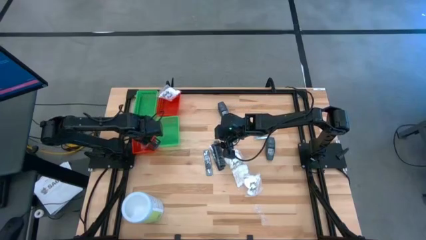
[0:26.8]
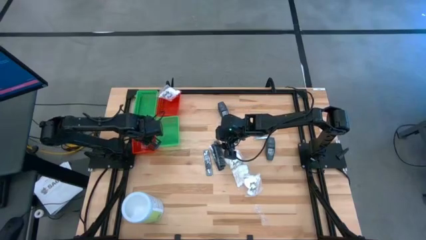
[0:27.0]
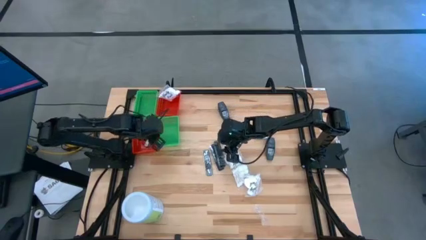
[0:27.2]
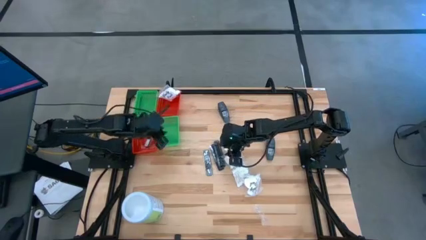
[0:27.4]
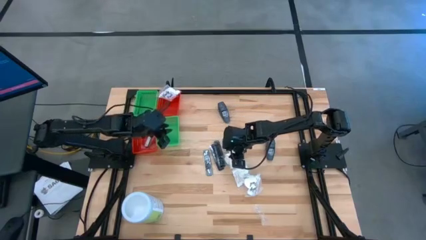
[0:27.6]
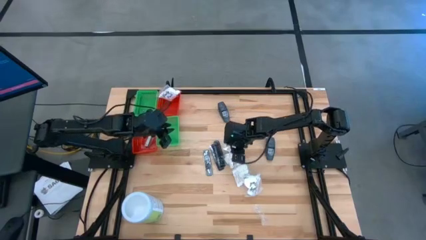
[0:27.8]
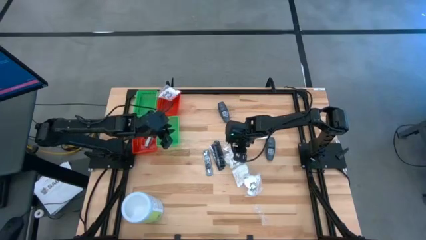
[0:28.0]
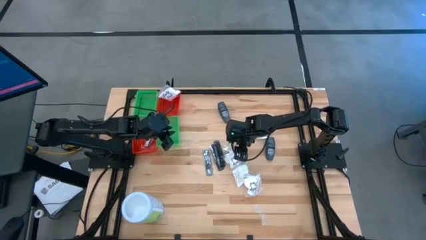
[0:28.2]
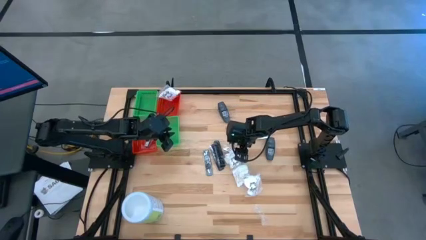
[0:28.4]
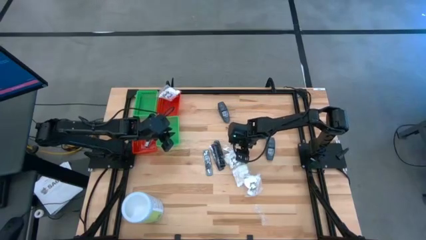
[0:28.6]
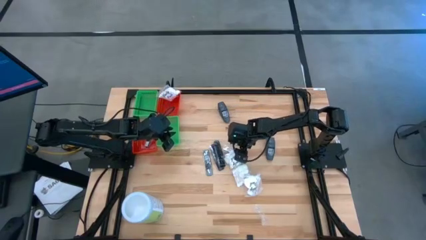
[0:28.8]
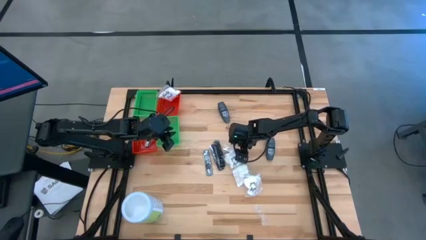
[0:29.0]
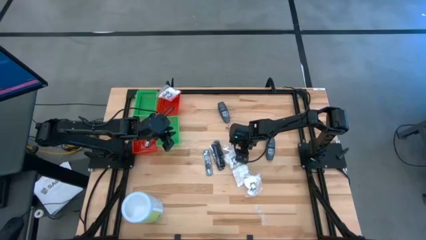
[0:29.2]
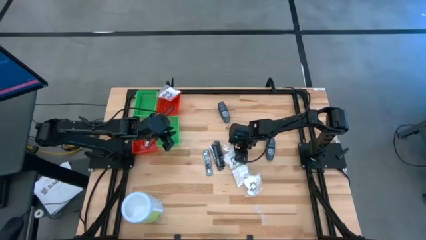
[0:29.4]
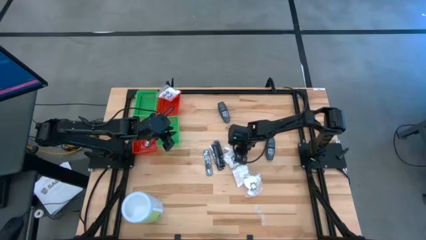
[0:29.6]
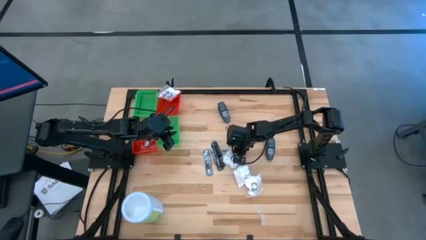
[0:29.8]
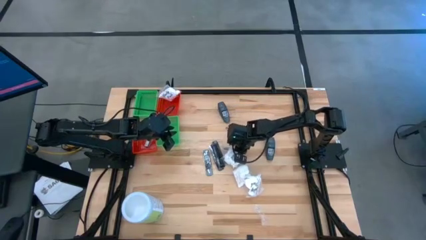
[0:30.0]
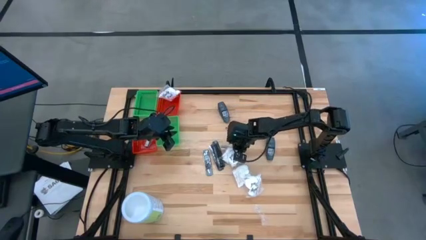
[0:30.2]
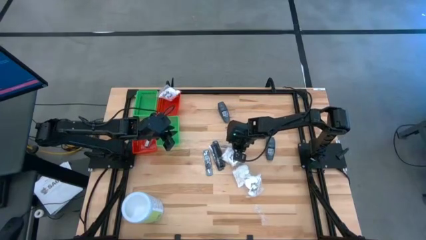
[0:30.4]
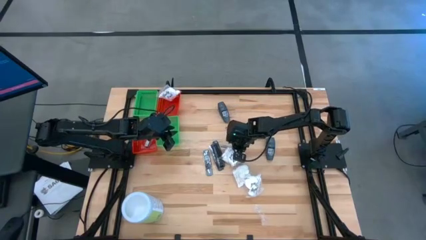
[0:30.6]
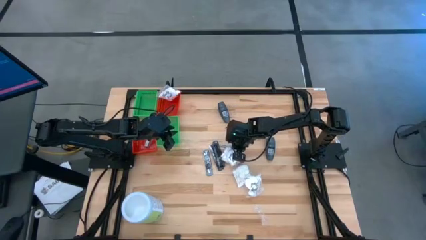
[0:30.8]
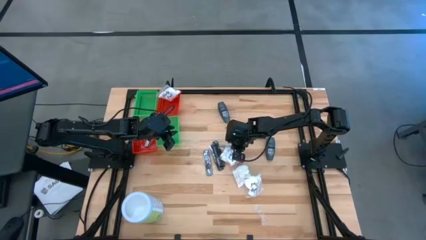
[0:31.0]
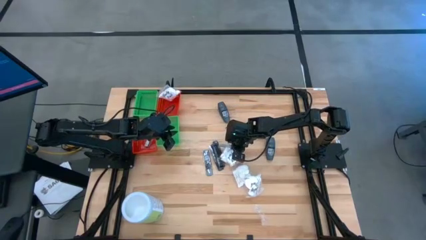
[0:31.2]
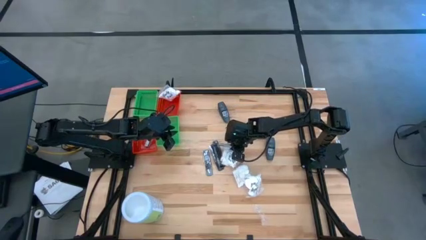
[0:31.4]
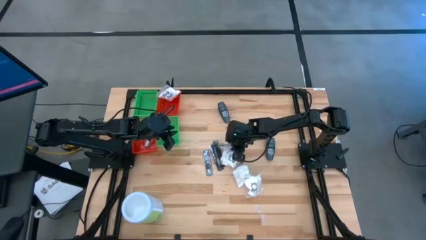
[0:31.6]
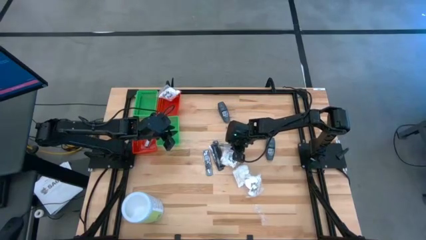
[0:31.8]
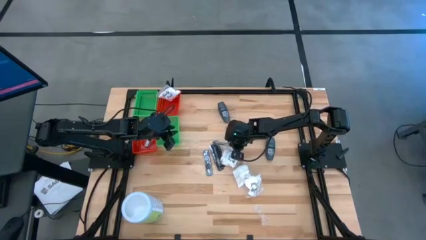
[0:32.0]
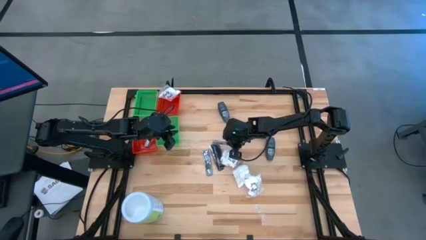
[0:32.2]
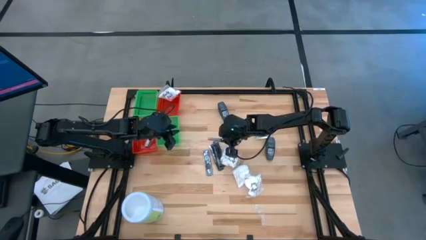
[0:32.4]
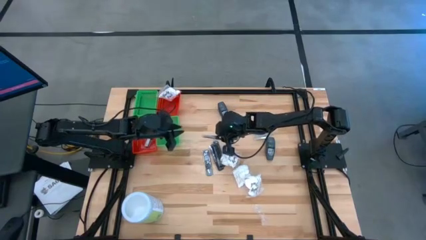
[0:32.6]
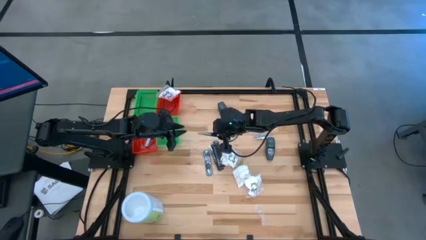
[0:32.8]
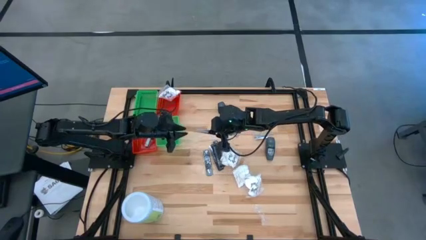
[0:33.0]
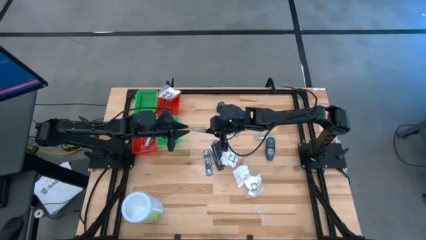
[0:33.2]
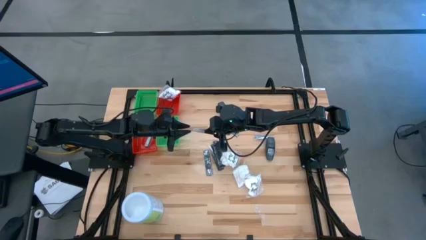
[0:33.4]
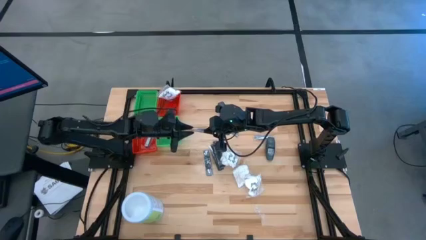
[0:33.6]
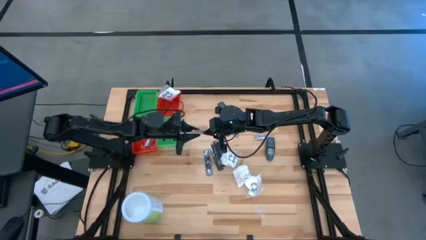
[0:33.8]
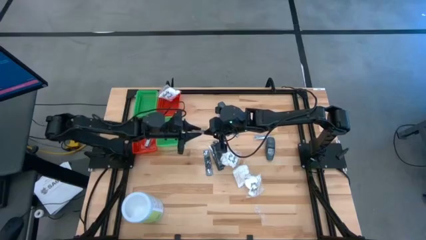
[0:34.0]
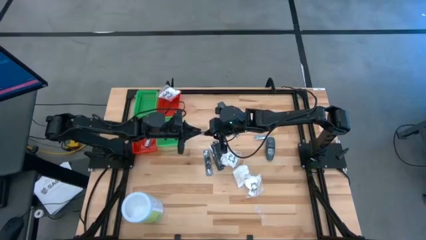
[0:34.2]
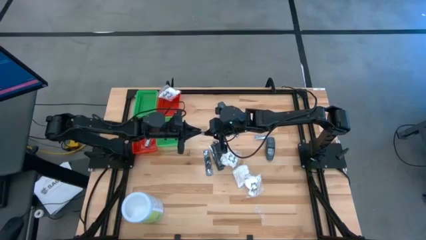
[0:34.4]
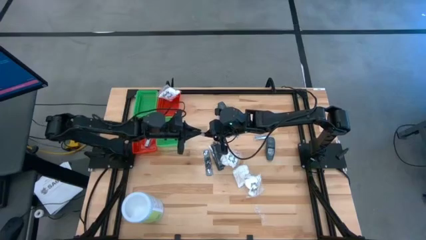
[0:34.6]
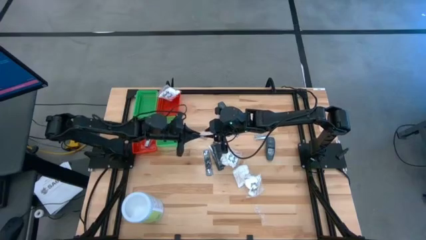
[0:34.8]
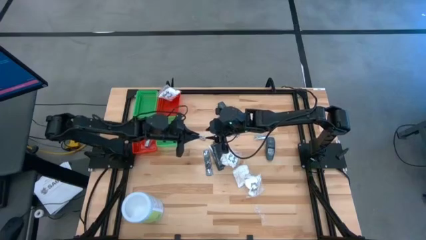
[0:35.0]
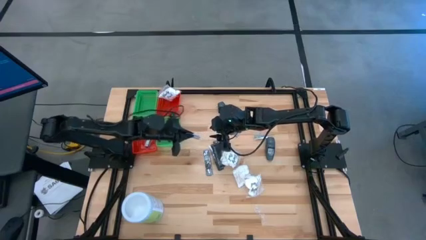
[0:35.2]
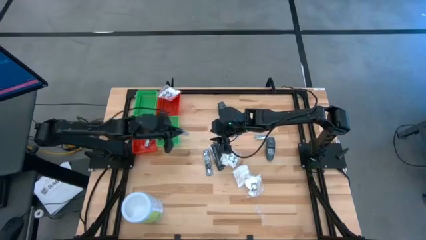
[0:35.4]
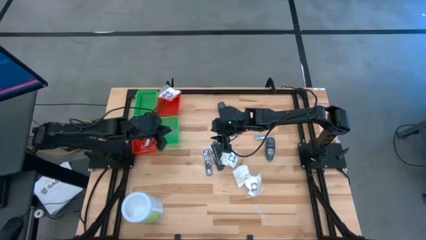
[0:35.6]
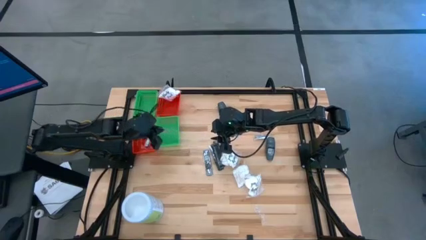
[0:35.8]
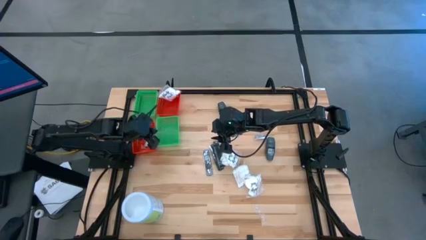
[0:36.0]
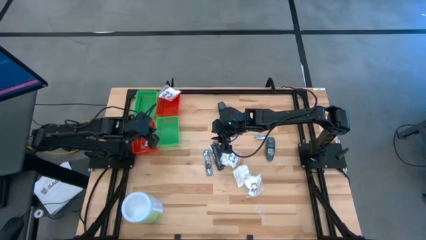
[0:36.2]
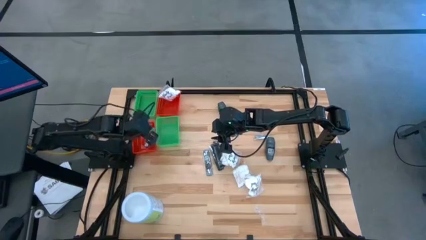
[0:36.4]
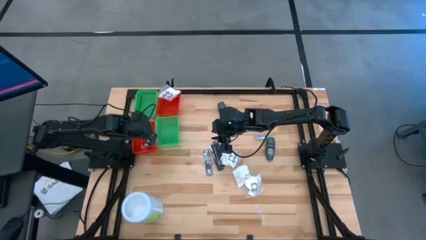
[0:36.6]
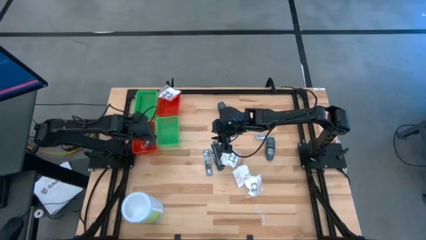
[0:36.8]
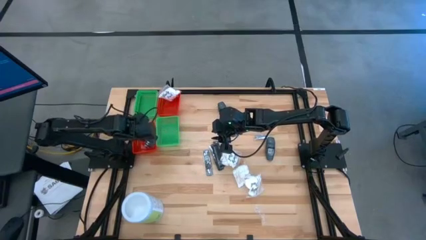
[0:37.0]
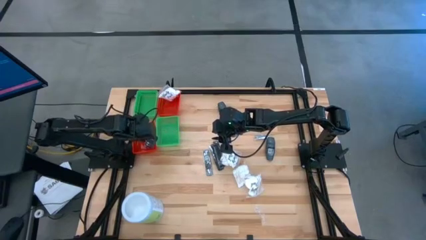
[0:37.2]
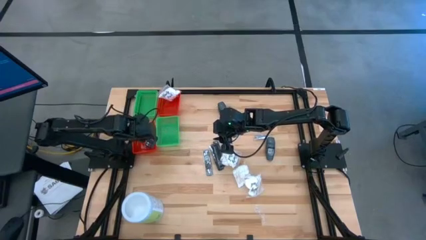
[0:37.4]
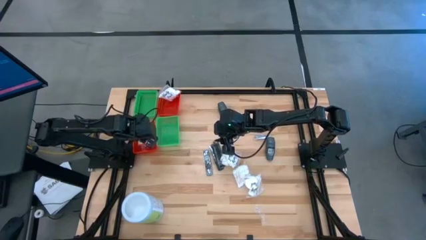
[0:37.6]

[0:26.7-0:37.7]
Task: Pick & Place Travel size toiletries
Put the silver nail cutter into the bottom red bin
